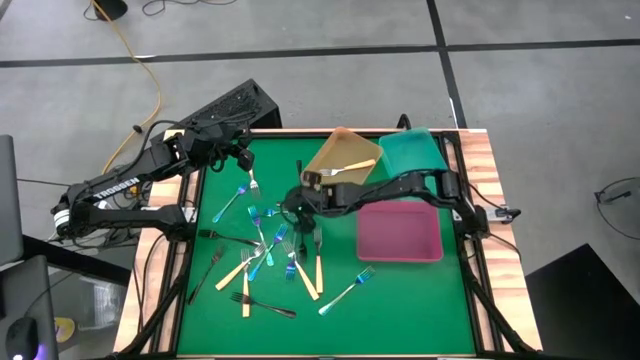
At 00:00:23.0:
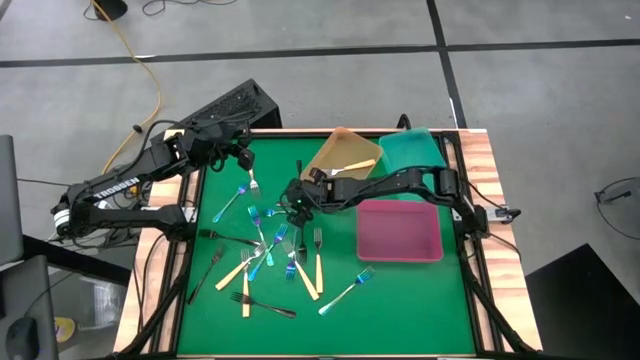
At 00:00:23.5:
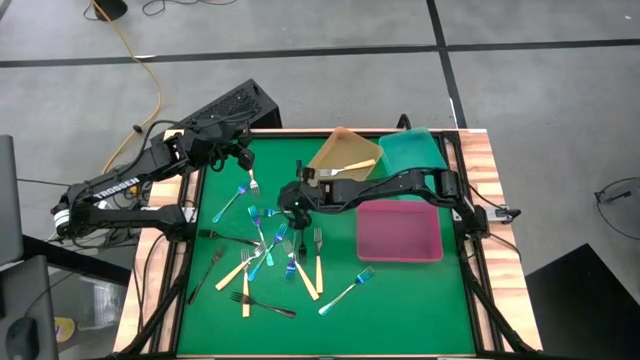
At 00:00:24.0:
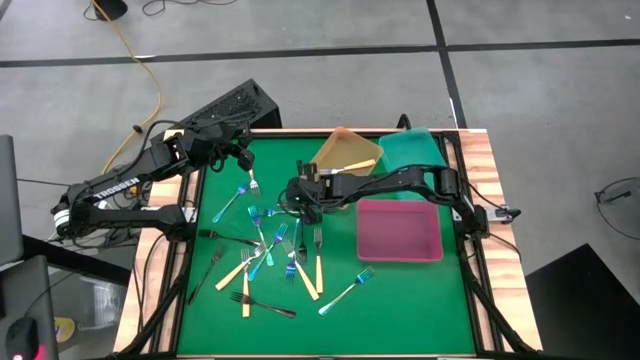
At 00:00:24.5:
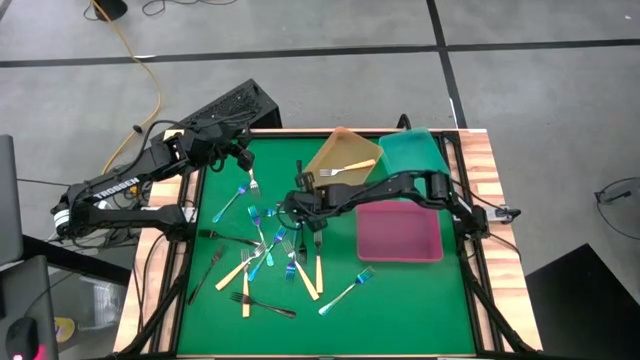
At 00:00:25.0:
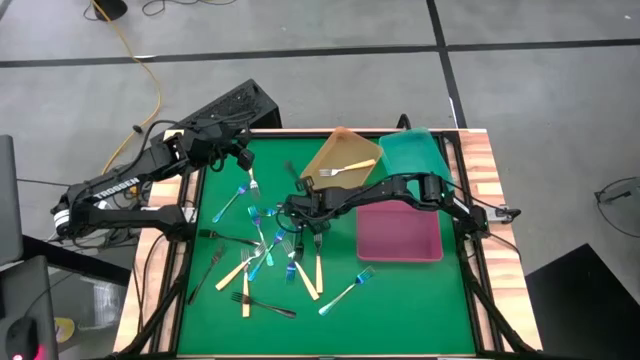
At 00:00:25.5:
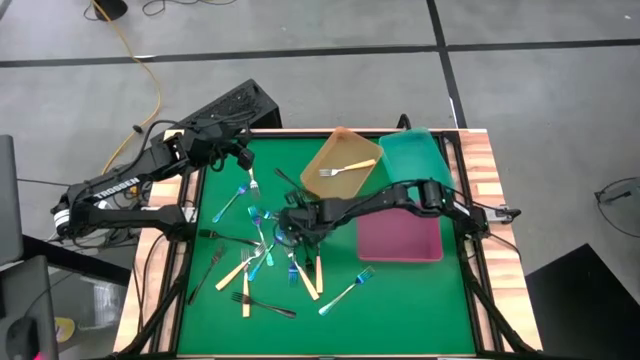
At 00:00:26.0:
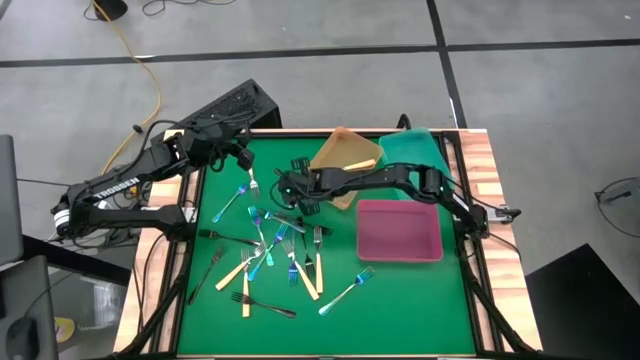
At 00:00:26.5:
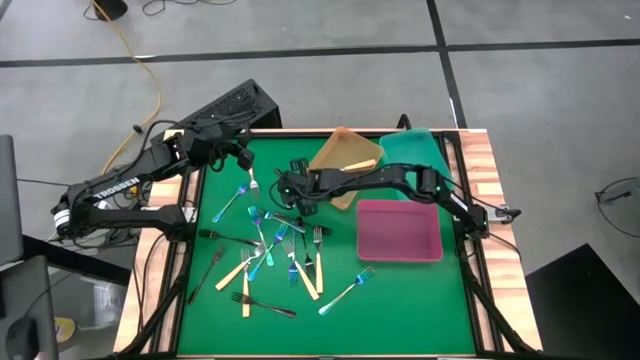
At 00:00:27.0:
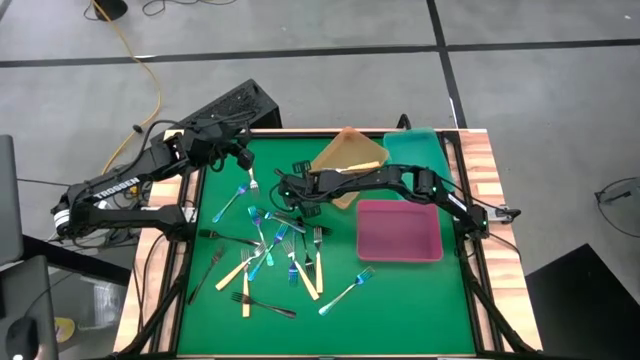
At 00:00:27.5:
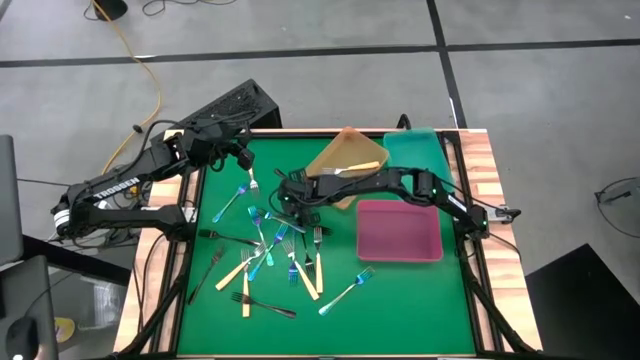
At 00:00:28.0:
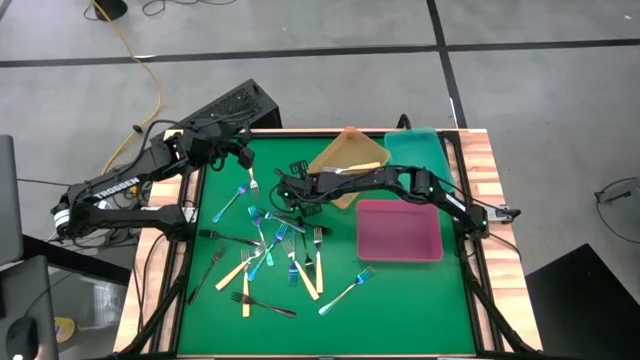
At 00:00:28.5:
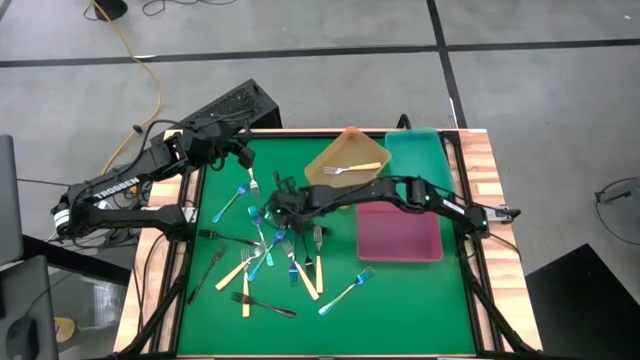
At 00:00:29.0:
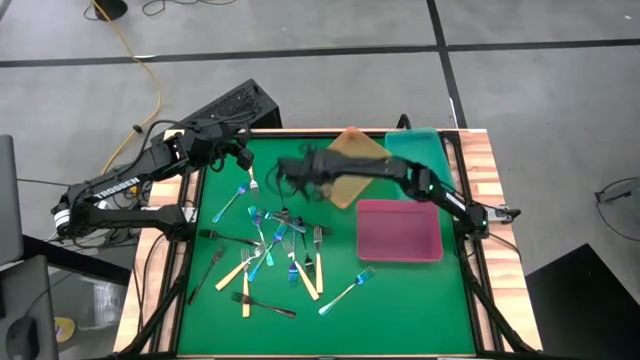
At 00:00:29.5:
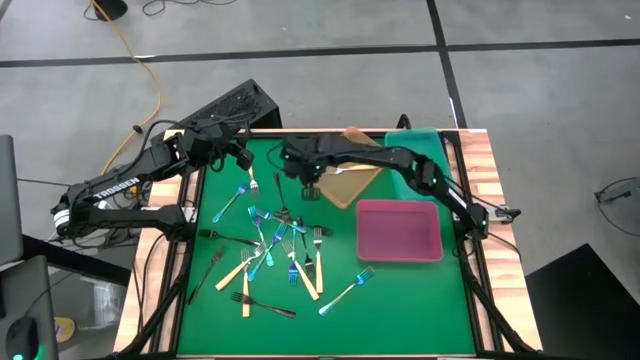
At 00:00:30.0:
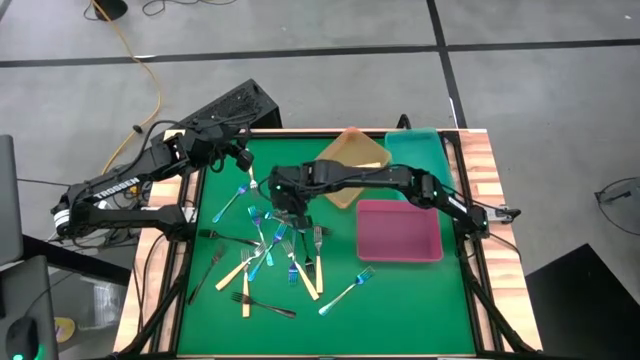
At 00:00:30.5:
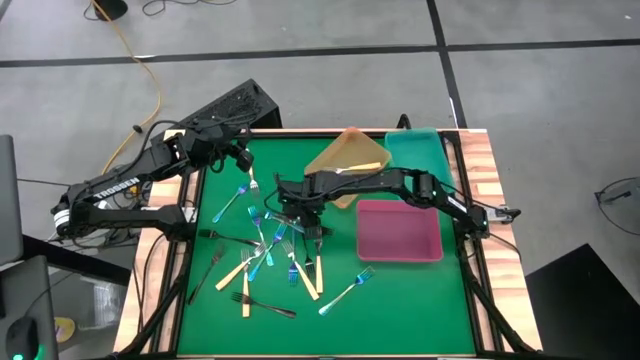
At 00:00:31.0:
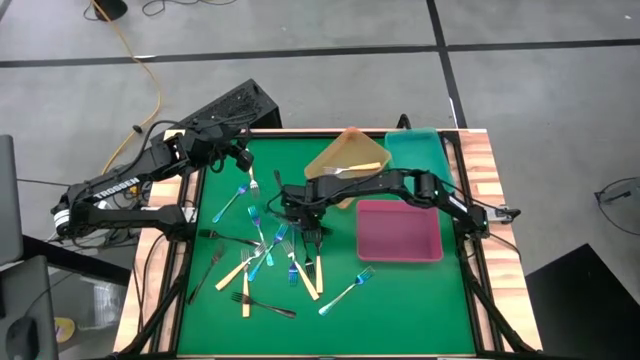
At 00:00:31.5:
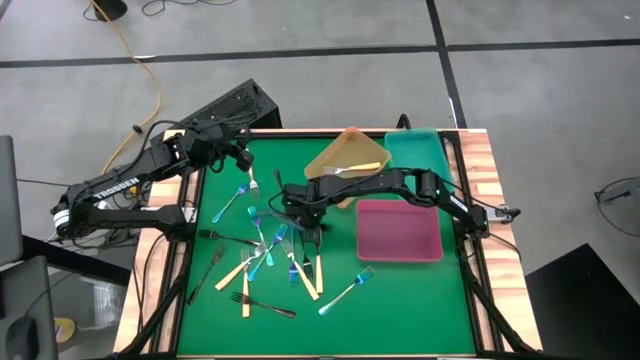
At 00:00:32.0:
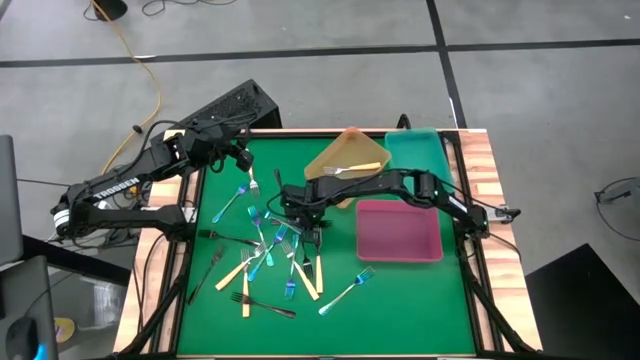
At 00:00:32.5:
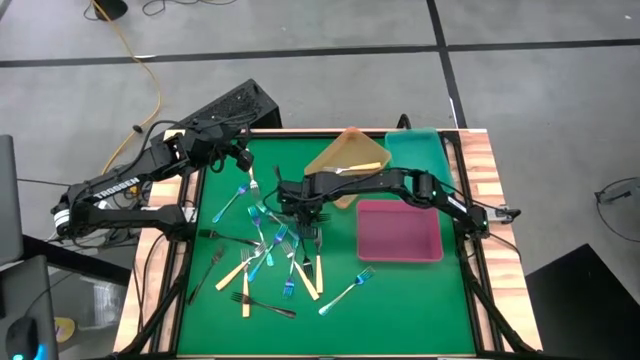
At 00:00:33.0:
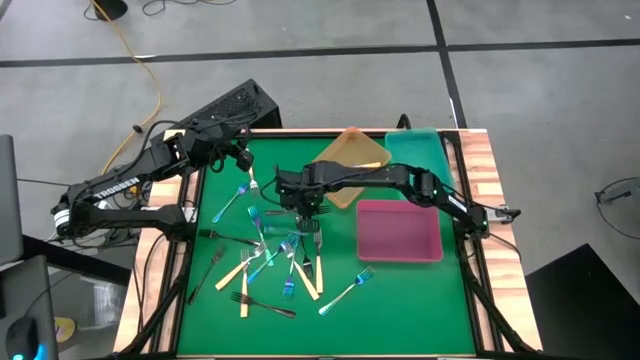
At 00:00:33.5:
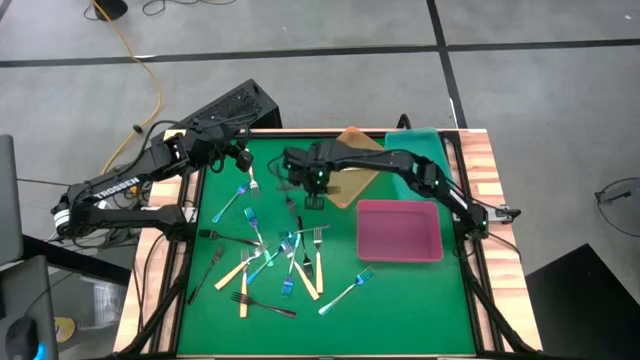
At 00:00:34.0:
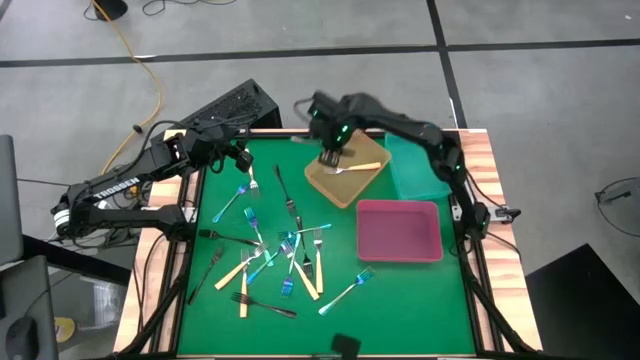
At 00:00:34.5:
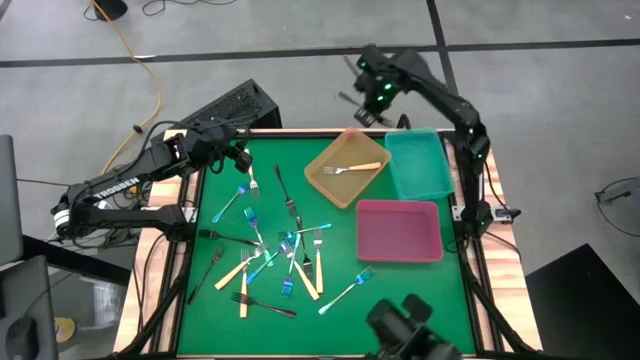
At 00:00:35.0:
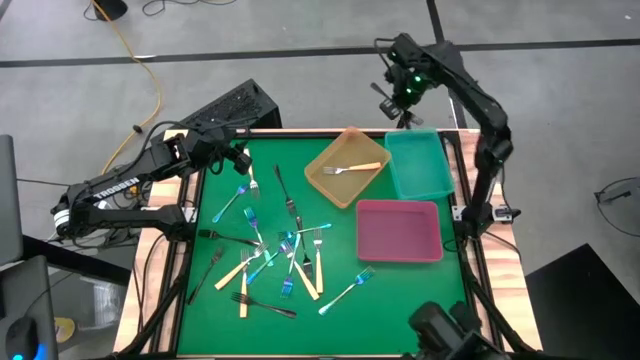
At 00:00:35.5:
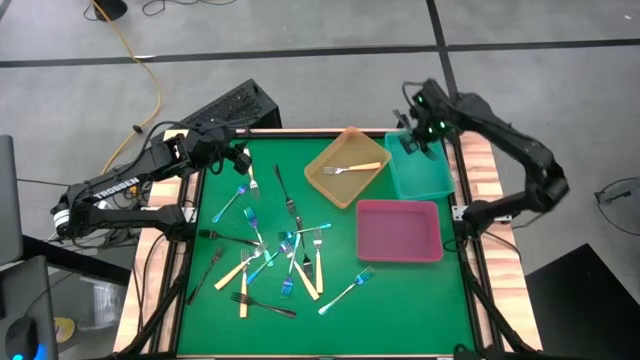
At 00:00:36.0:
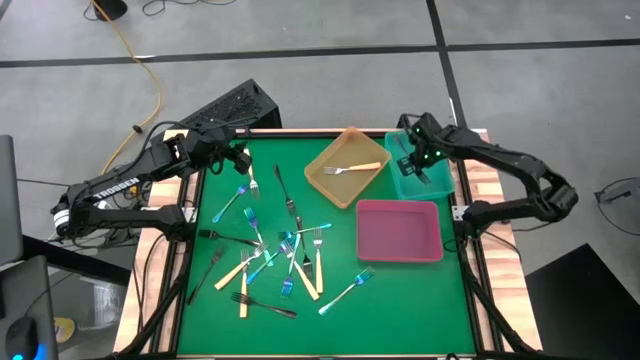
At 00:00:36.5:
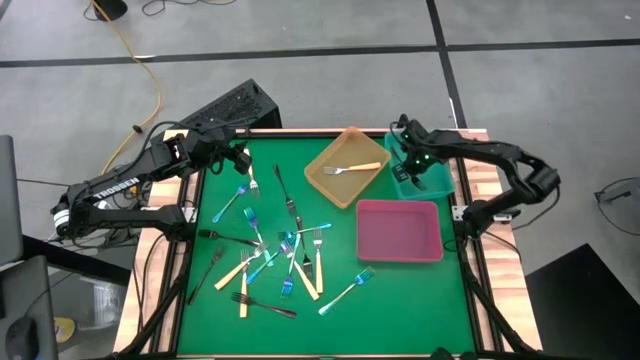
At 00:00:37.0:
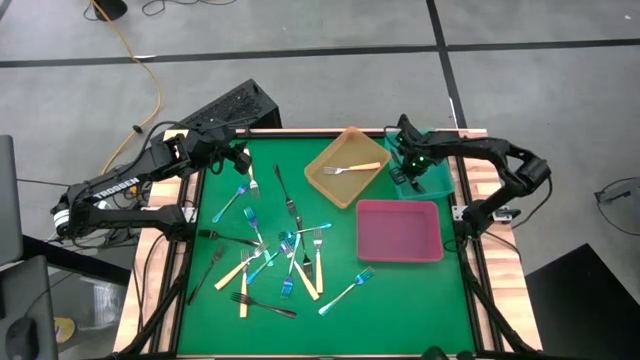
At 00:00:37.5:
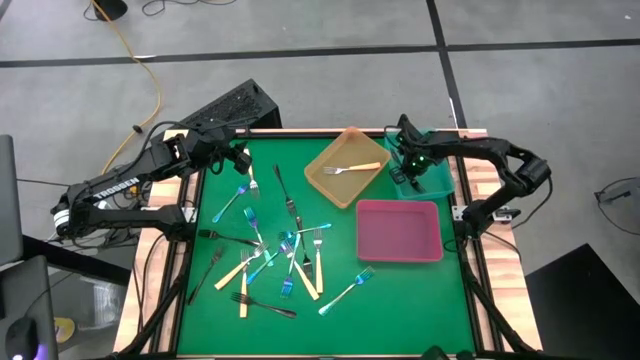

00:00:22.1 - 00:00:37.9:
Task: Sort silverware by color (type)
Put the black fork into the blue bin
